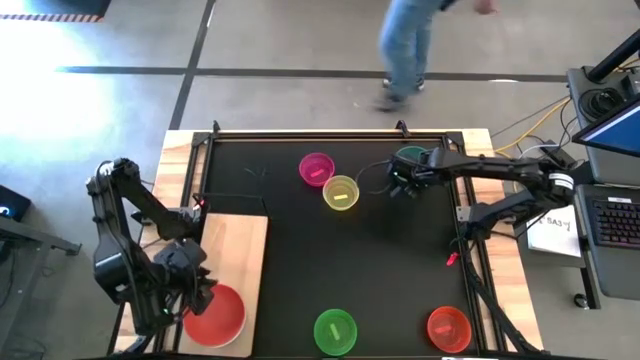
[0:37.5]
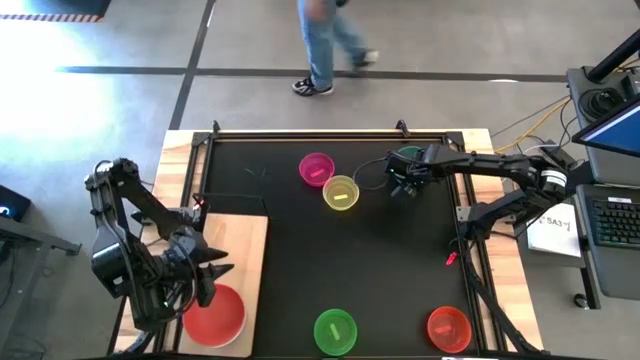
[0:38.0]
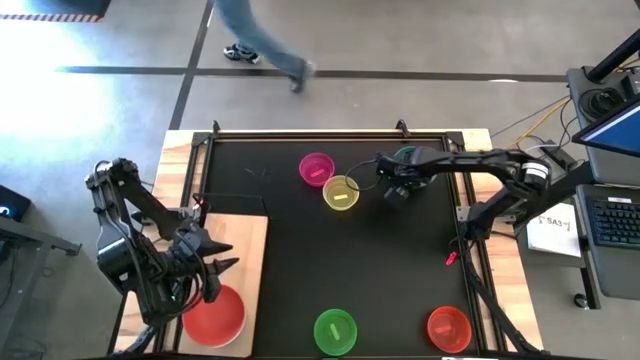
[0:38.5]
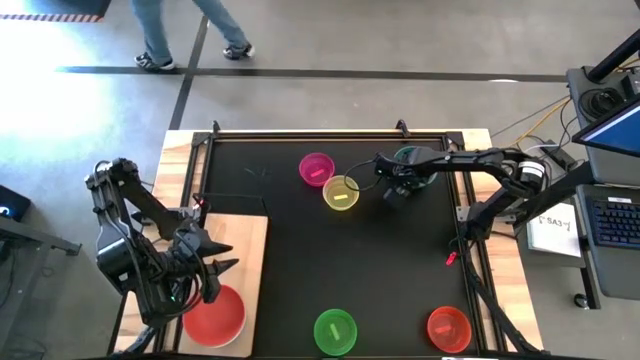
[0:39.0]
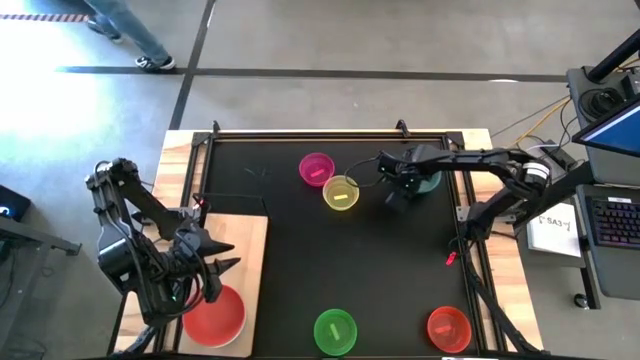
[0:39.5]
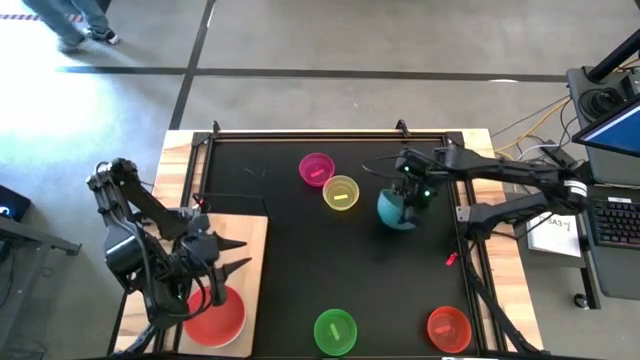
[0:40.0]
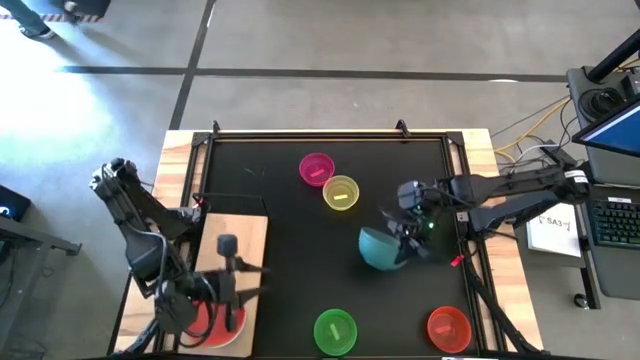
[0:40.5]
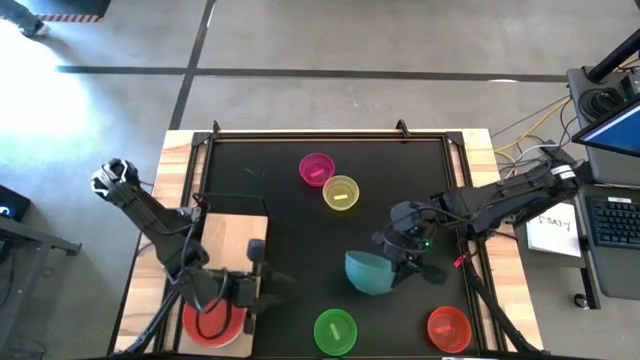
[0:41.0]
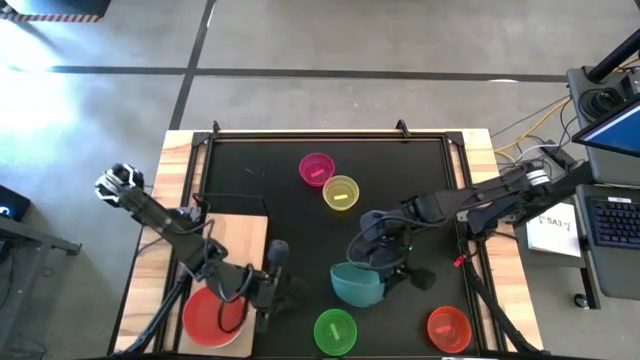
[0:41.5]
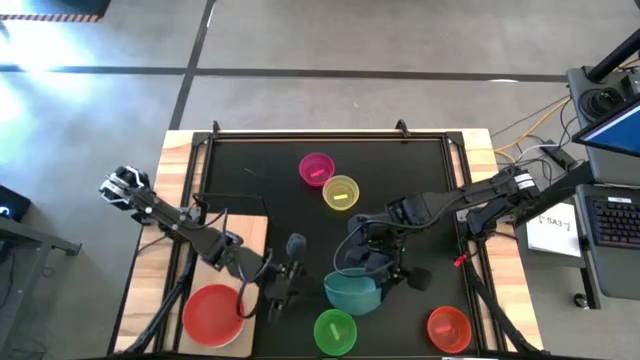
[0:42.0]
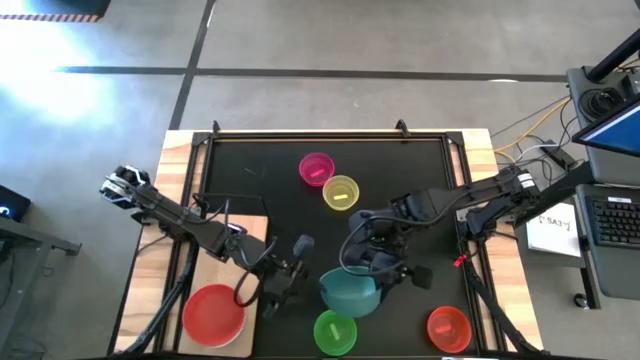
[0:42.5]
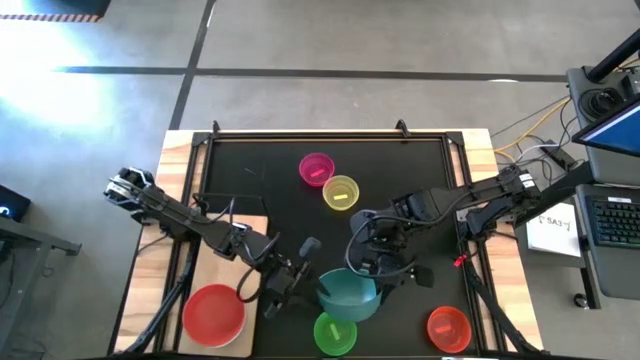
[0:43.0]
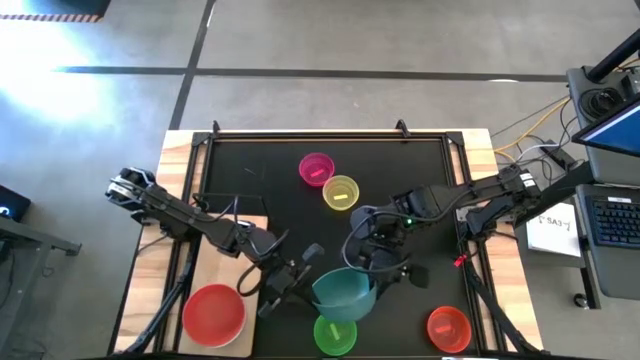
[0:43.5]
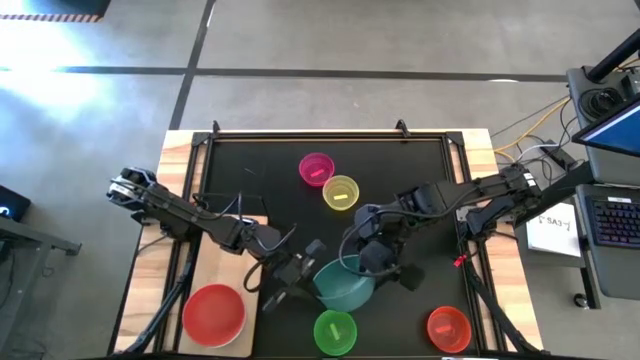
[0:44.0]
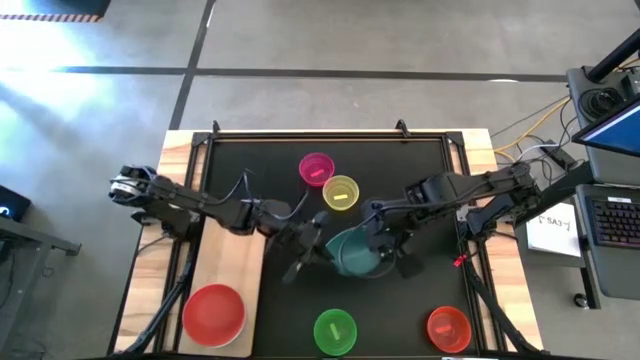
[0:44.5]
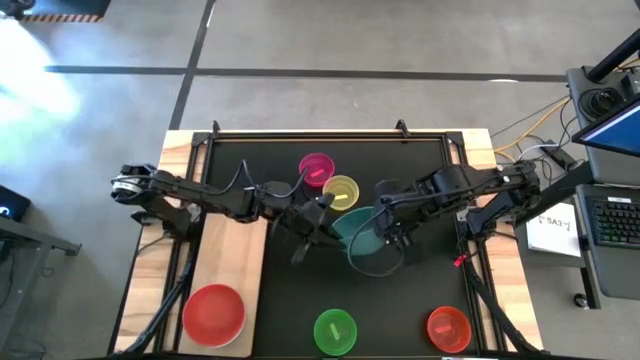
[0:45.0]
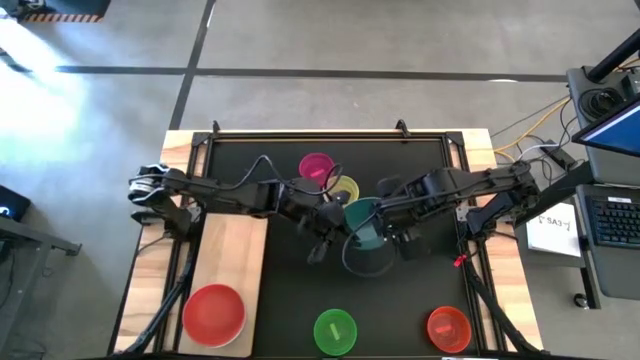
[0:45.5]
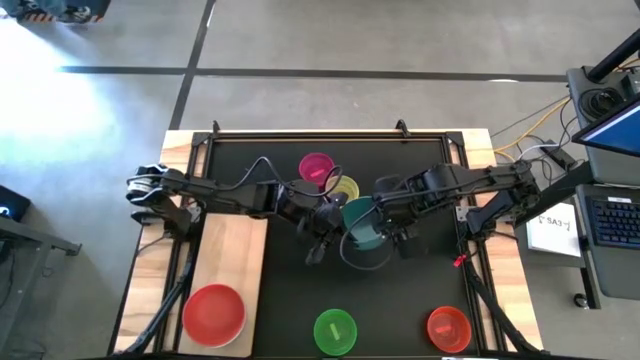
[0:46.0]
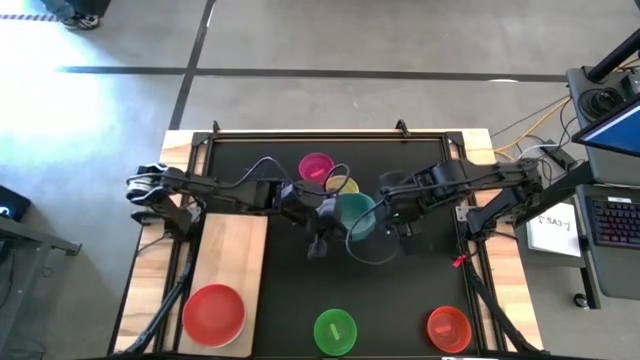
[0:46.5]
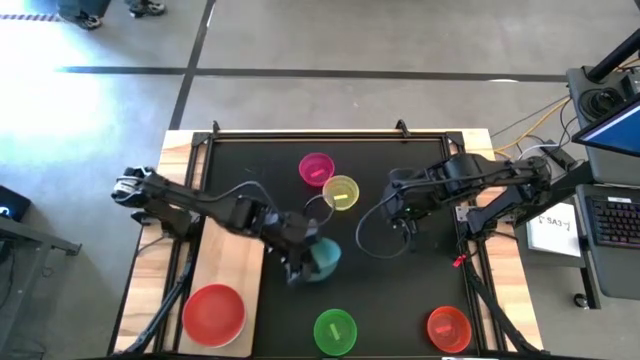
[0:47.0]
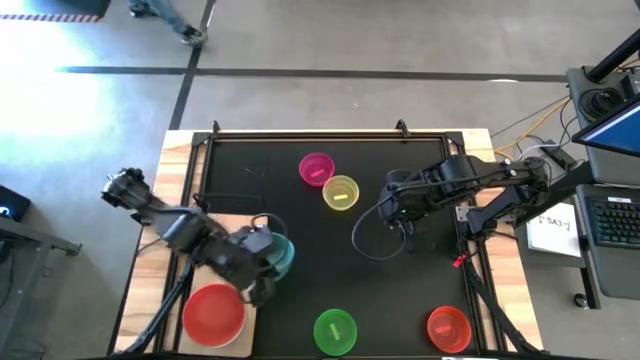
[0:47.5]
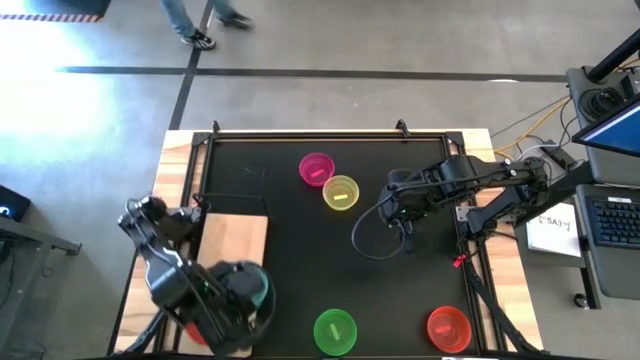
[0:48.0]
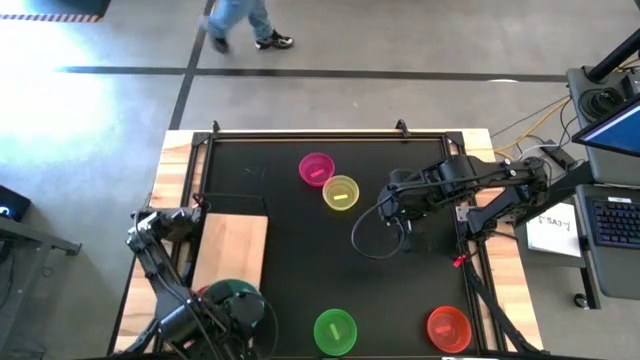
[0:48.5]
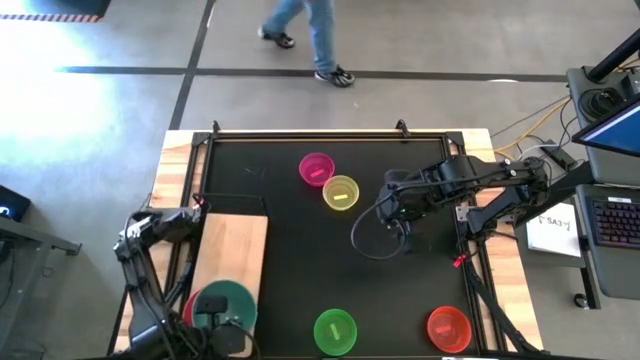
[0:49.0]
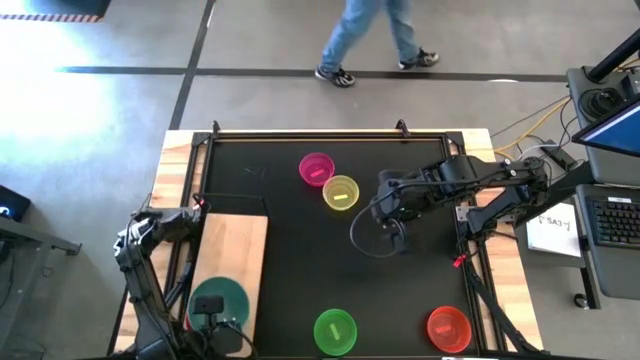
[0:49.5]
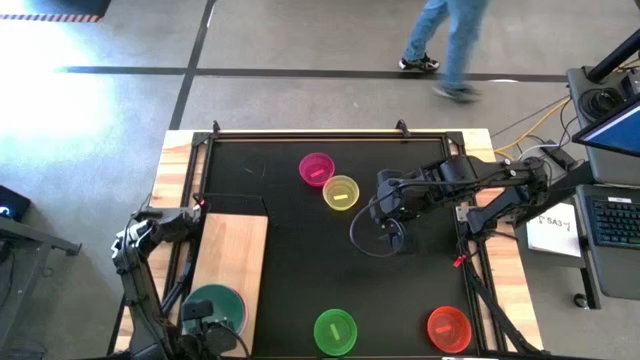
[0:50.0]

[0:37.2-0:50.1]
Task: Place and stack bowls onto a shelf
Stack the blue bowl on top of the orange bowl on the shelf

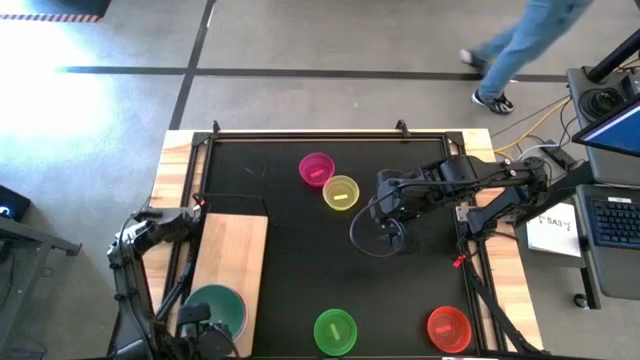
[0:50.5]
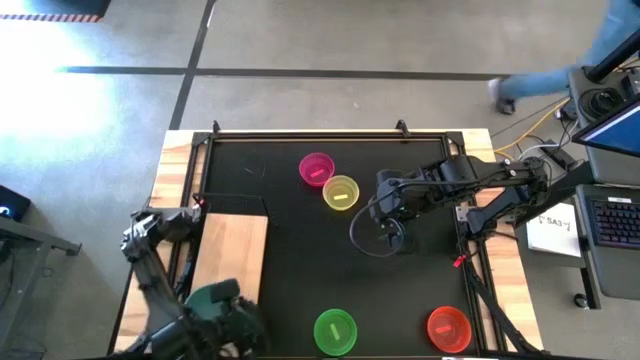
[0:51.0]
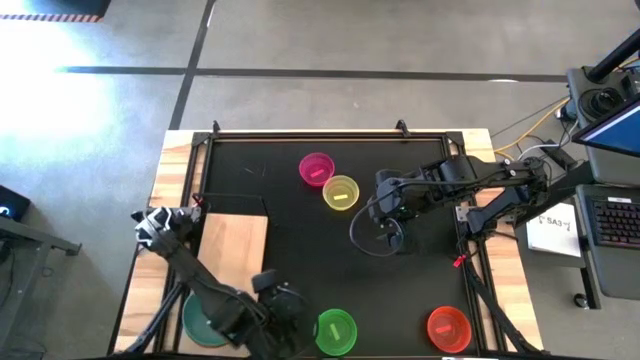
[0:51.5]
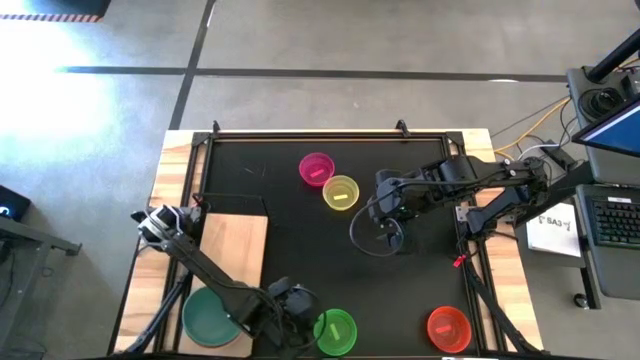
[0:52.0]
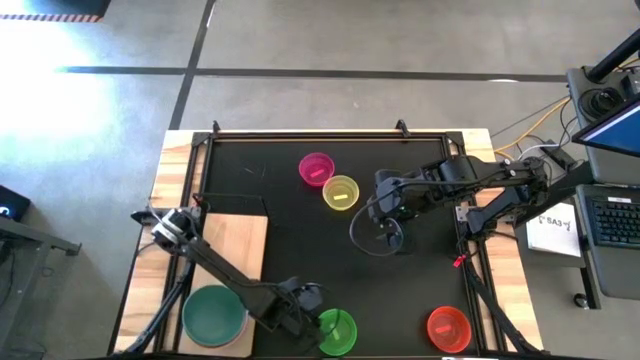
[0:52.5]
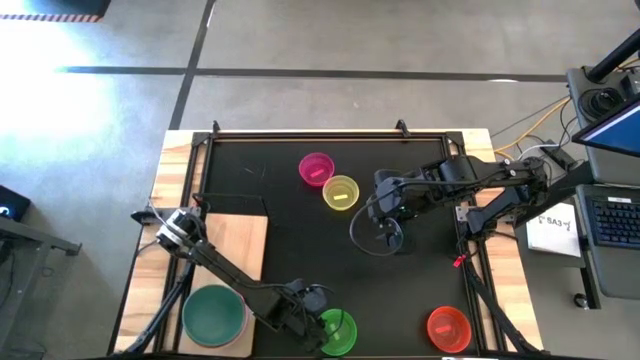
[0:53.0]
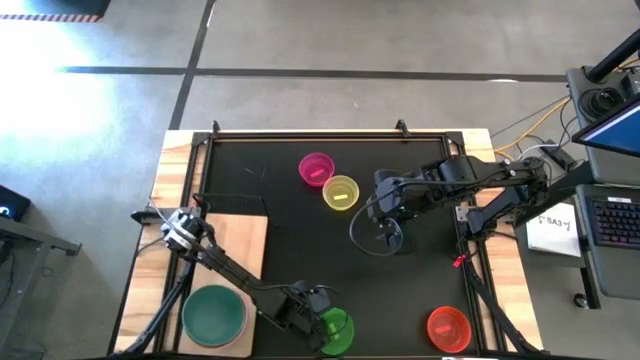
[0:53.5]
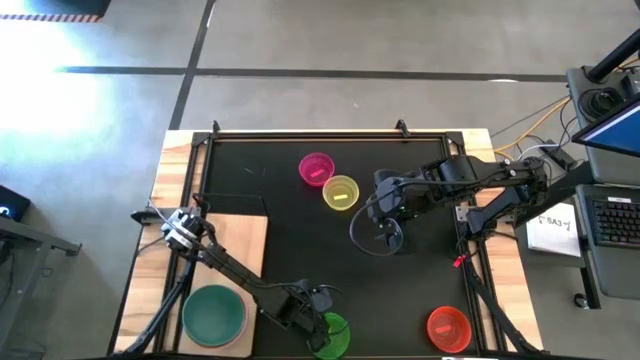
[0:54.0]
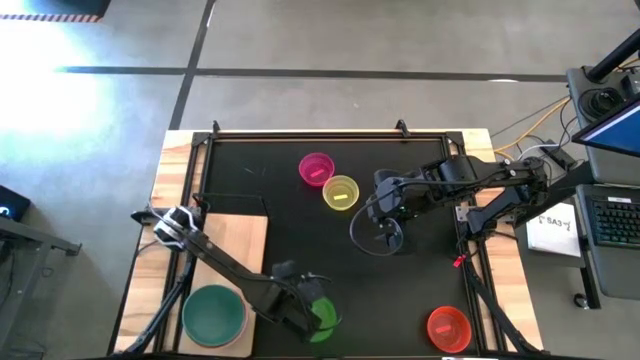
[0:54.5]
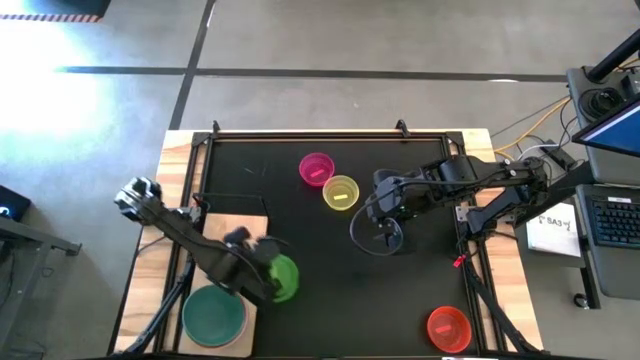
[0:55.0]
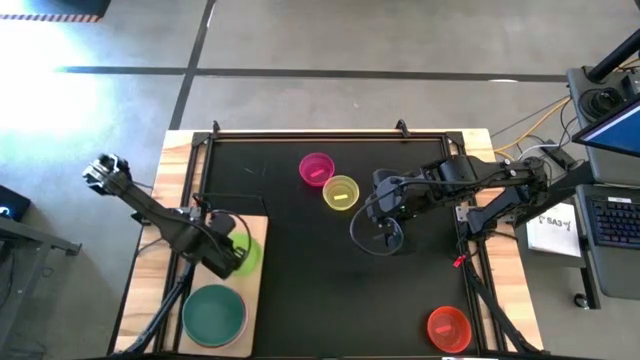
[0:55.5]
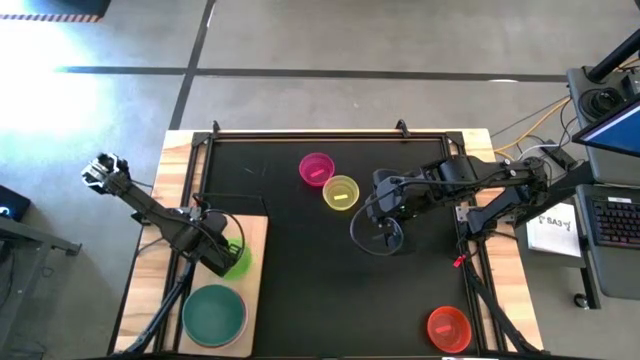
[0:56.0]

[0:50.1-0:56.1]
Put the green transparent bowl on the shelf

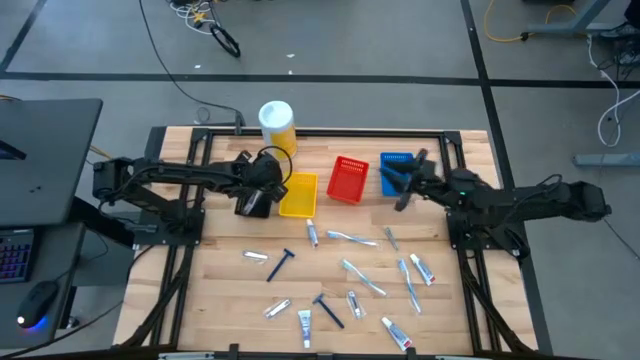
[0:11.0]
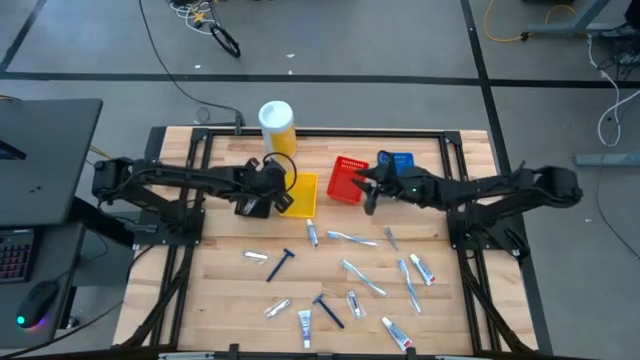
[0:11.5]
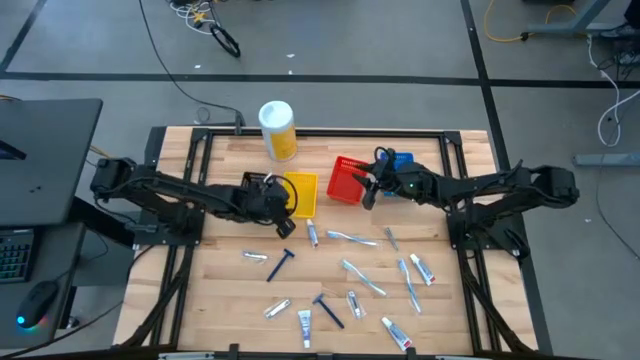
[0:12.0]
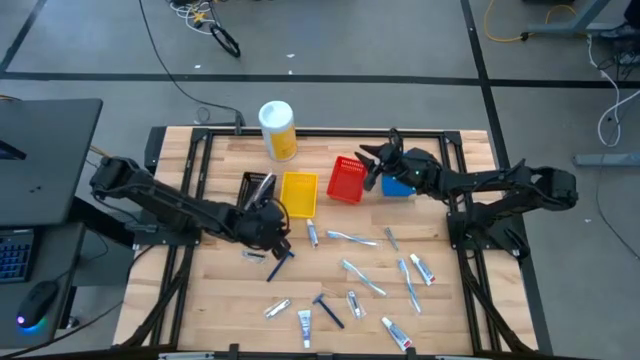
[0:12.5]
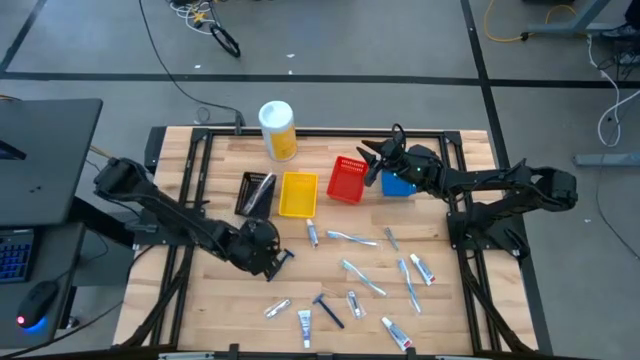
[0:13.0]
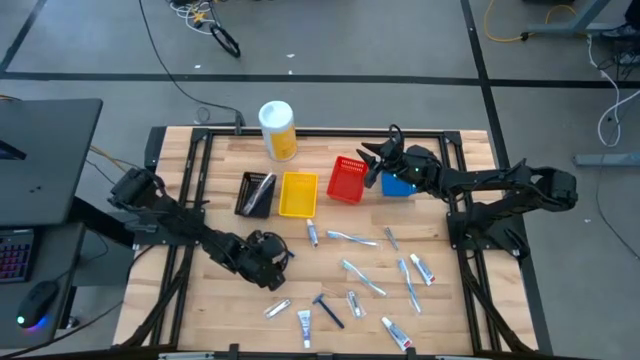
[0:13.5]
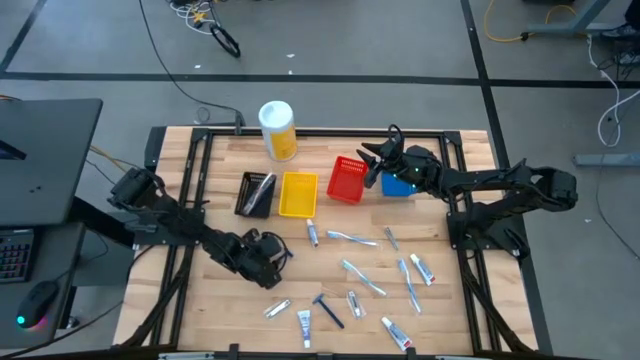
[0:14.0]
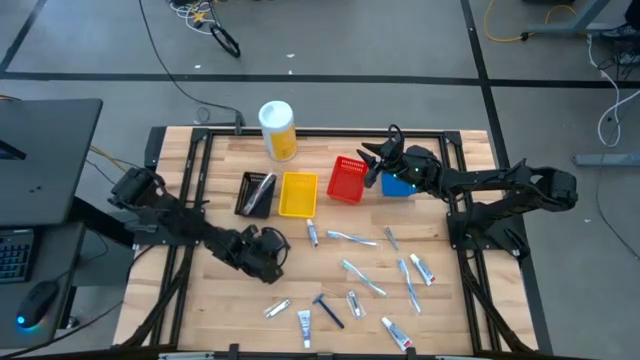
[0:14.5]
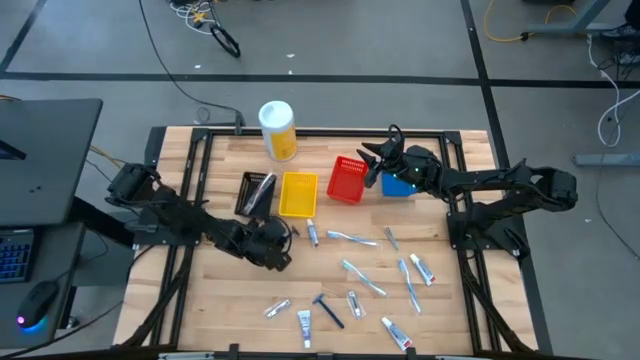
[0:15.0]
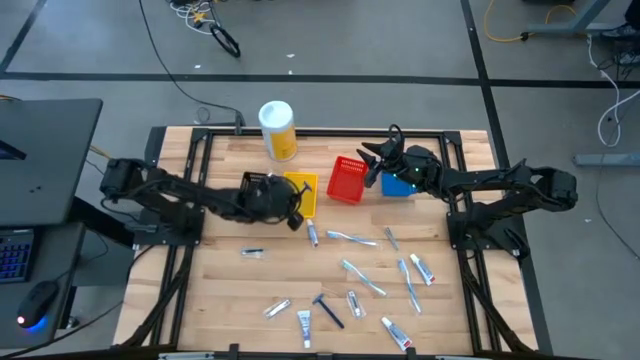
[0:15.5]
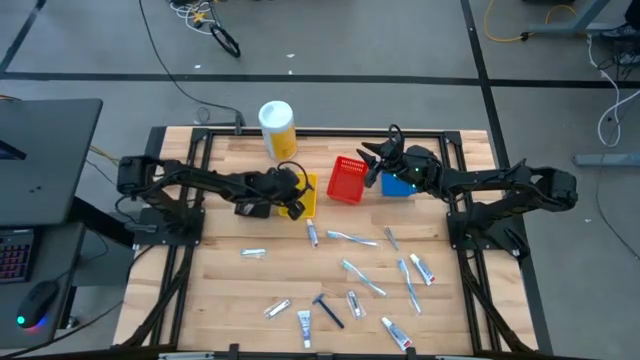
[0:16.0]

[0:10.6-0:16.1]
Task: Pick & Place Travel size toiletries
Put the blue razor into the yellow bin
